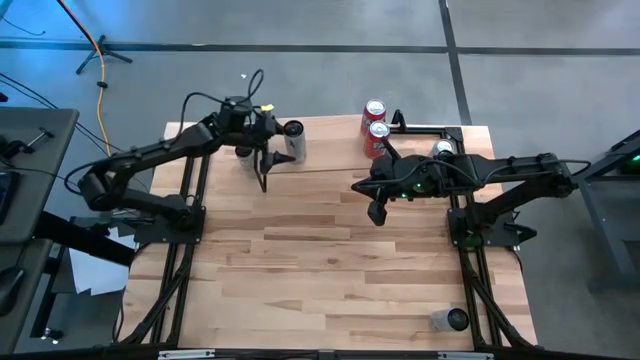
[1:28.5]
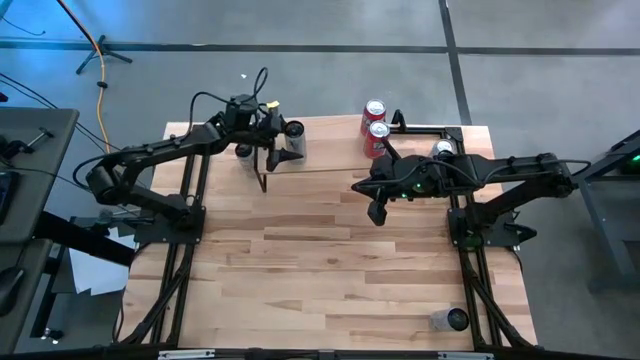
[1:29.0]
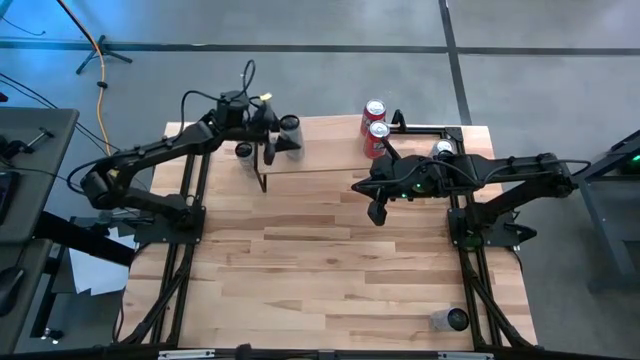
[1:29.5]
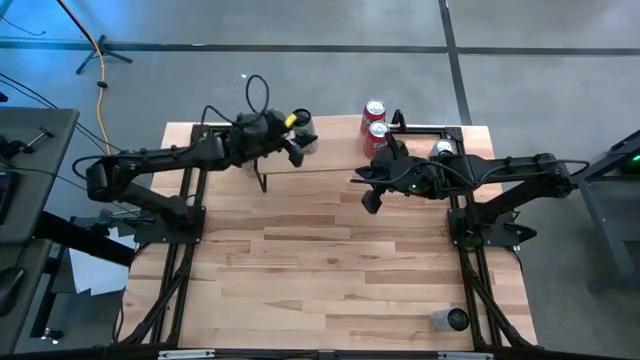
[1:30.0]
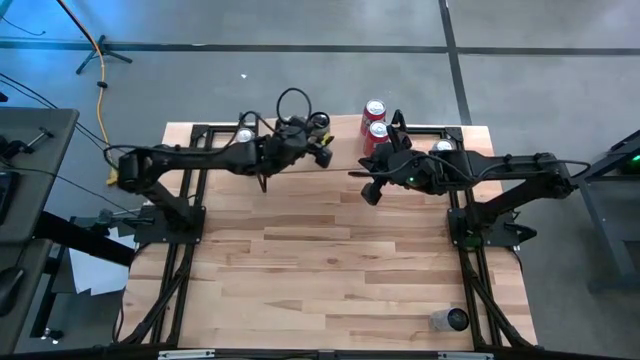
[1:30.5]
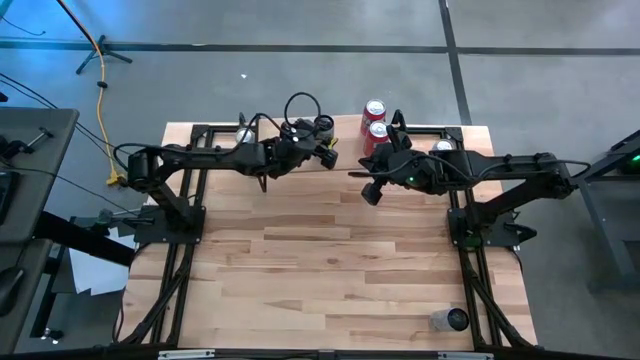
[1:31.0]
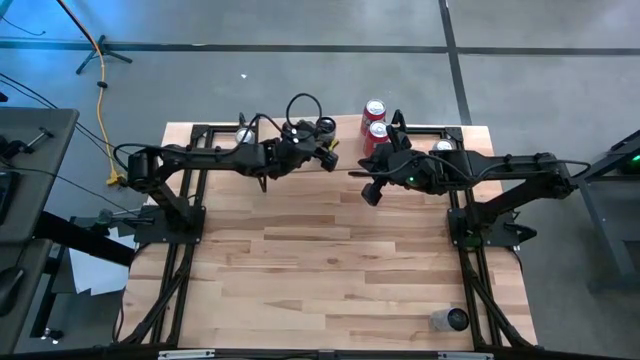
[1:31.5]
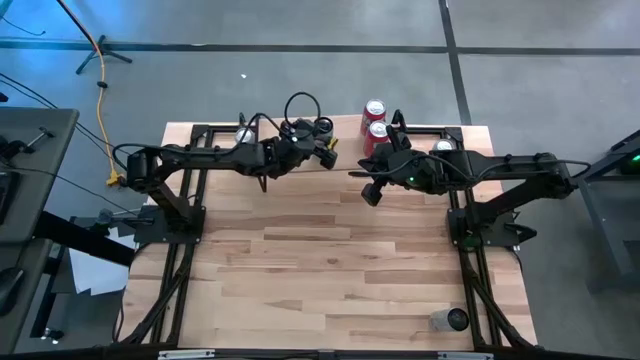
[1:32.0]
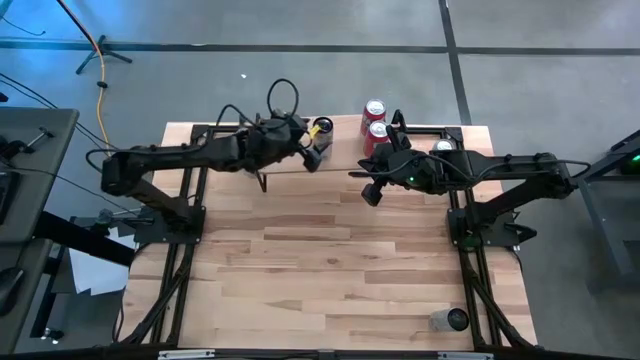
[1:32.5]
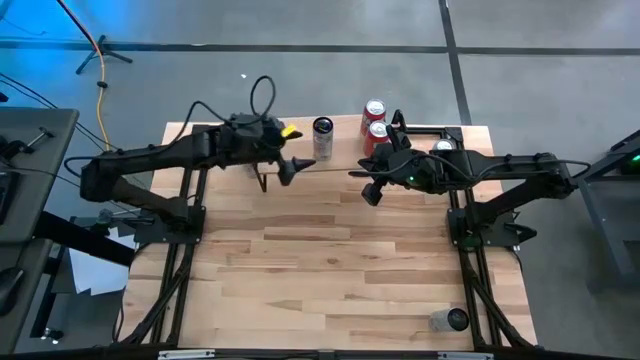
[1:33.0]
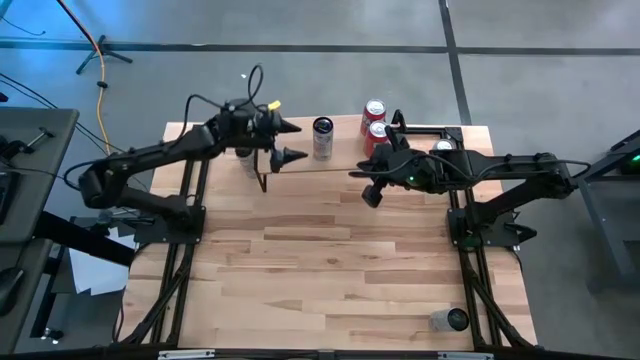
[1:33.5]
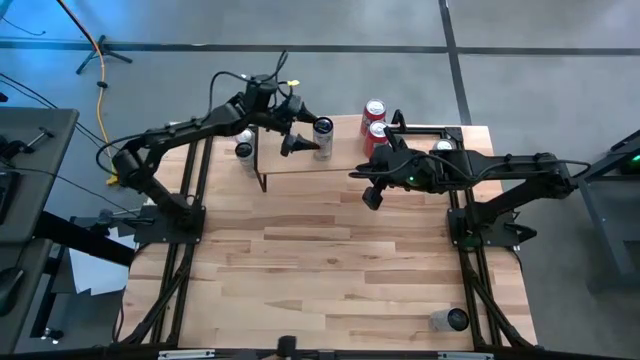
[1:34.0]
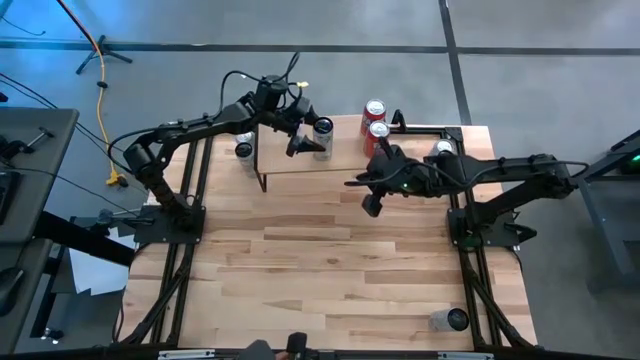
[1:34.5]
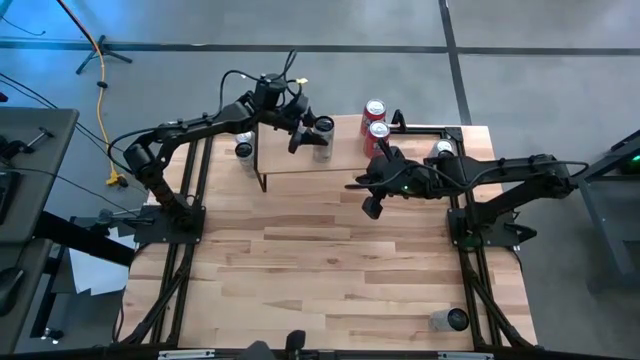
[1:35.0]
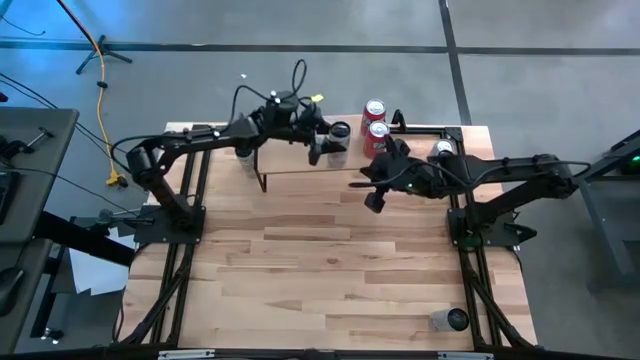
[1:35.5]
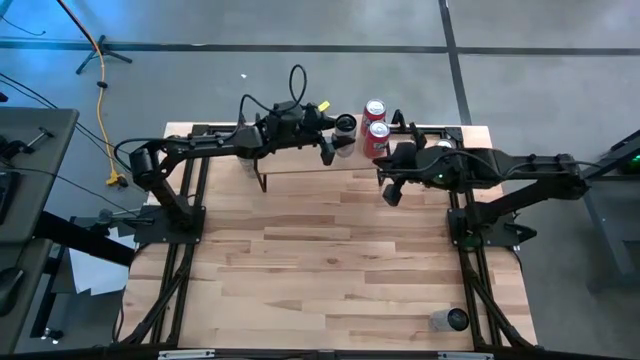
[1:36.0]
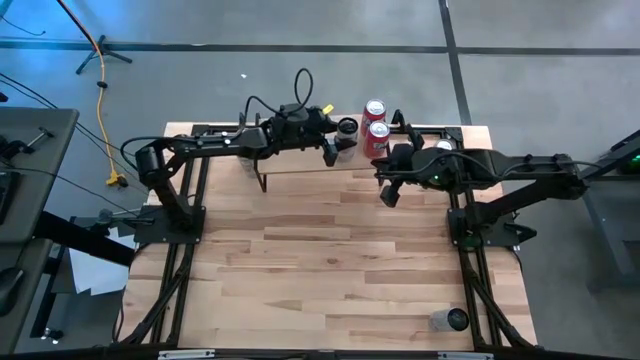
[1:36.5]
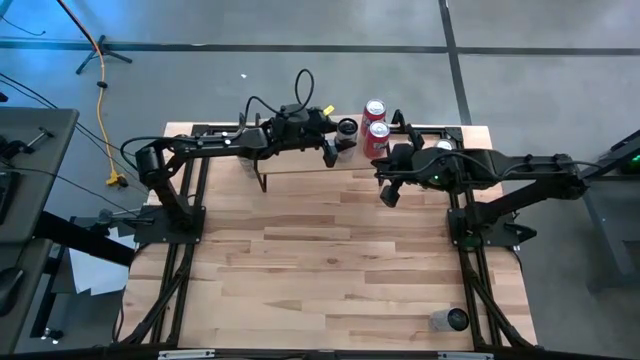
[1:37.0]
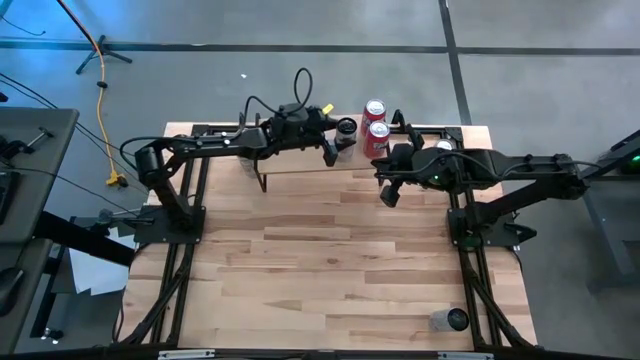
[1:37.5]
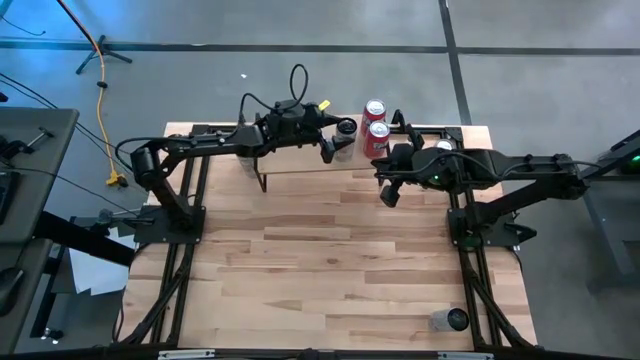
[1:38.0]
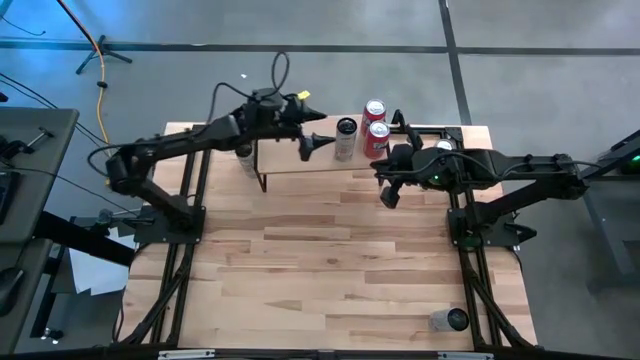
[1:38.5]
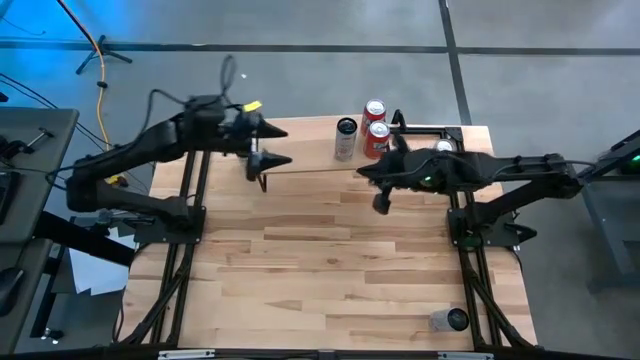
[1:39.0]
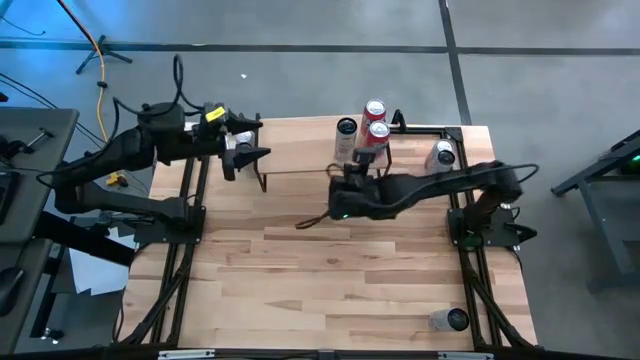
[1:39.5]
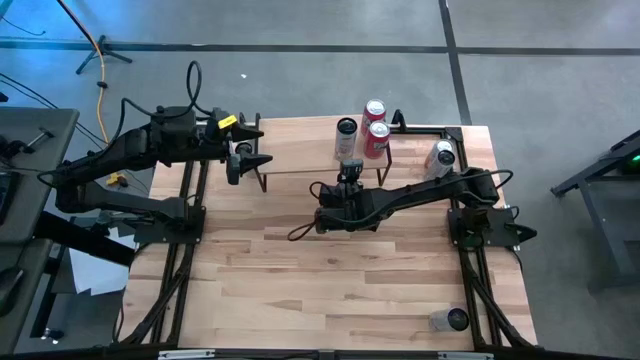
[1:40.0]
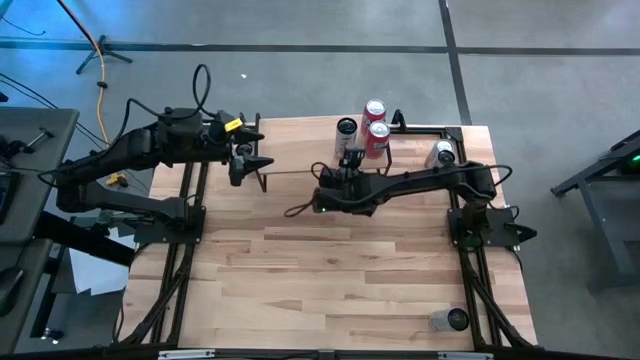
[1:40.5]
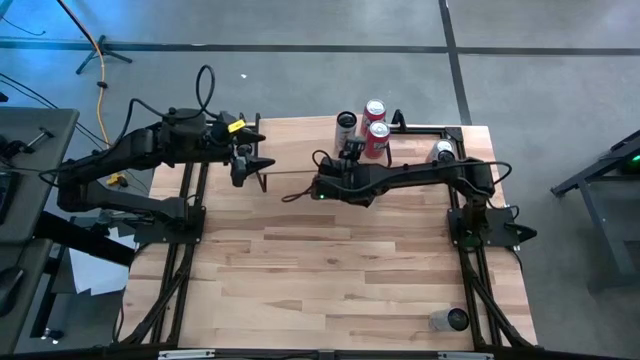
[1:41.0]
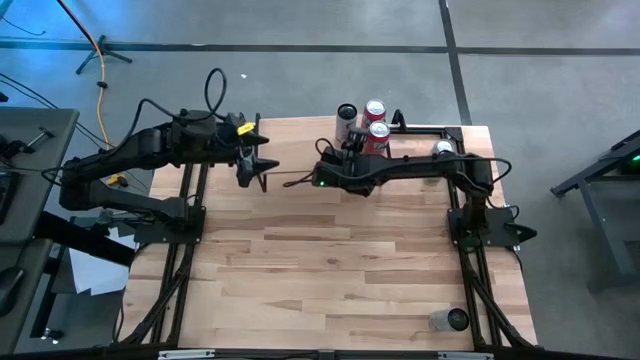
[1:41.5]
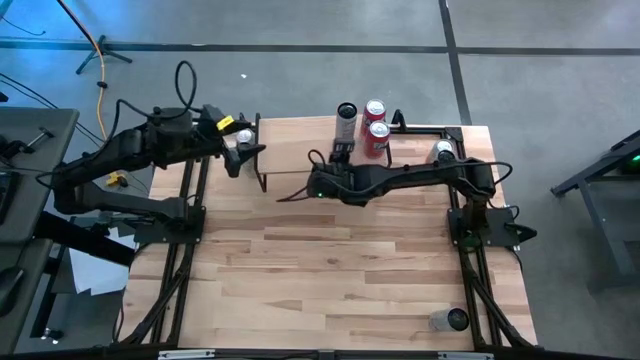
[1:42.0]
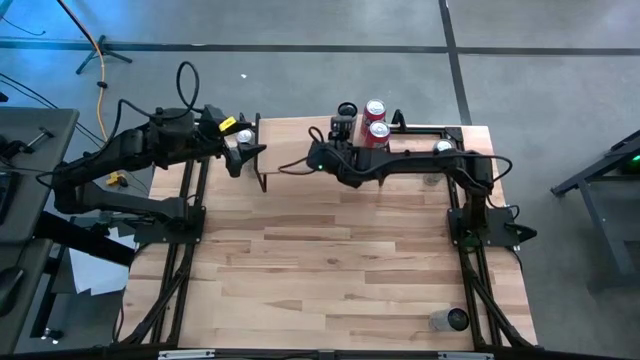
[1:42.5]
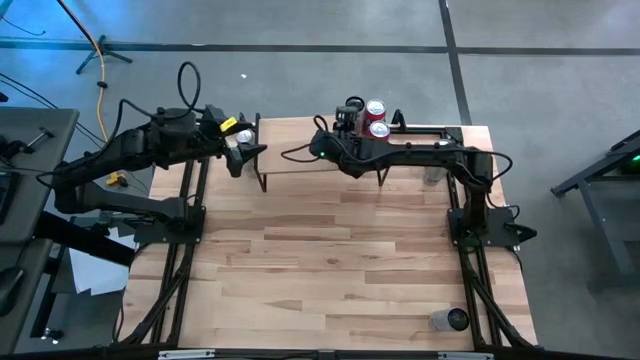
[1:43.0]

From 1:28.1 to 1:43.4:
Task: Place canned beverage on shelf
Put the bottom black orange soda can on the shelf

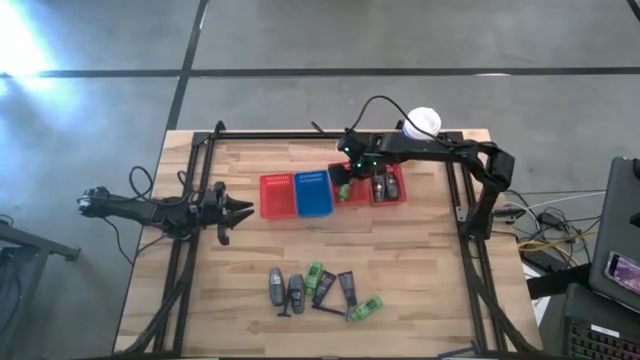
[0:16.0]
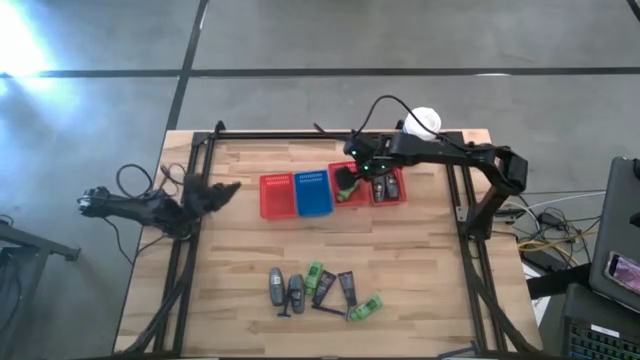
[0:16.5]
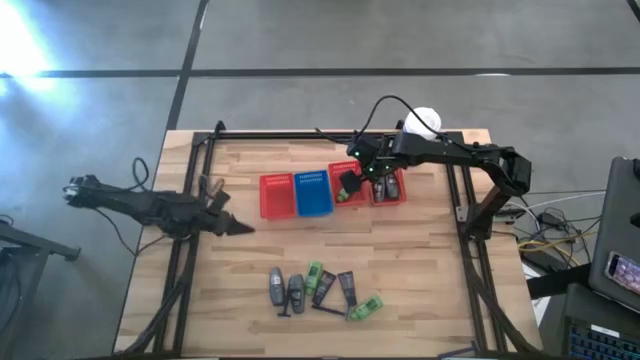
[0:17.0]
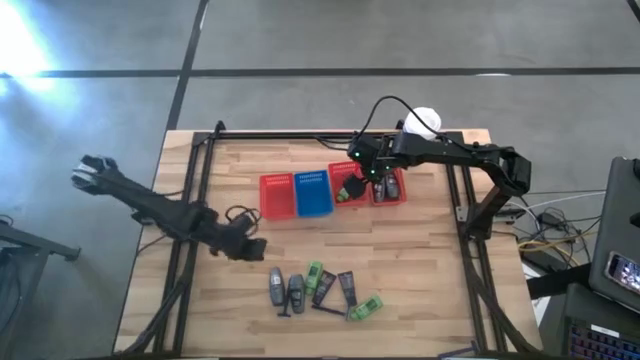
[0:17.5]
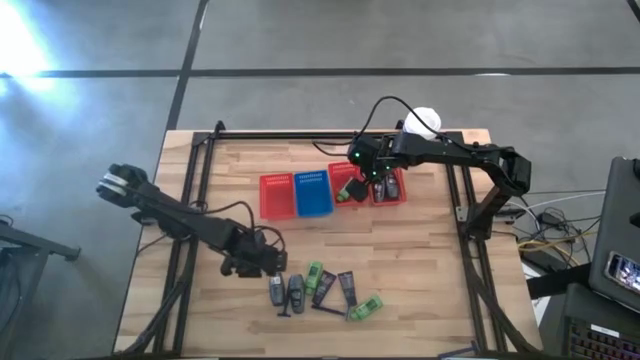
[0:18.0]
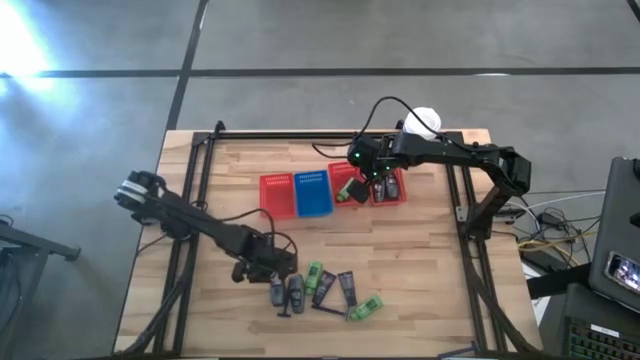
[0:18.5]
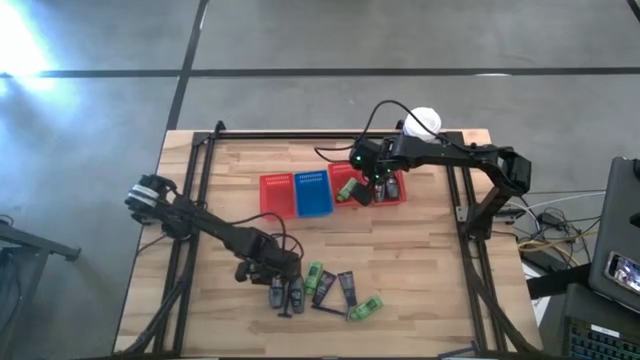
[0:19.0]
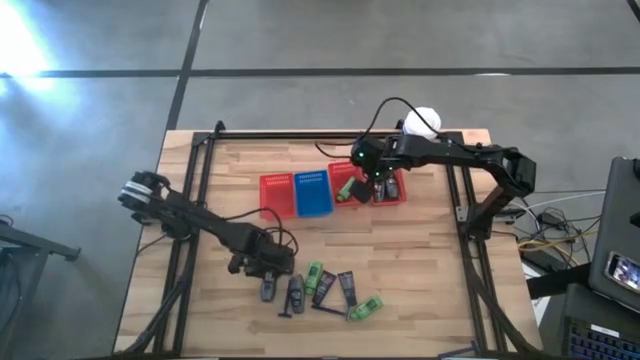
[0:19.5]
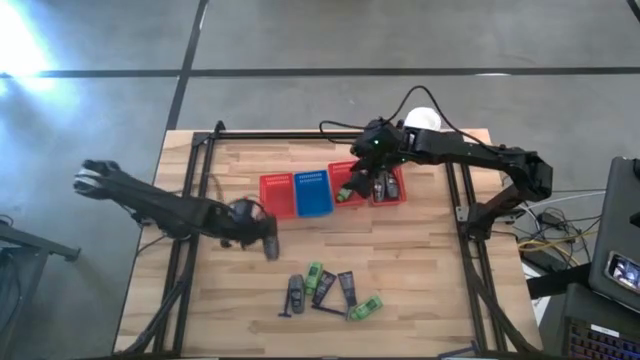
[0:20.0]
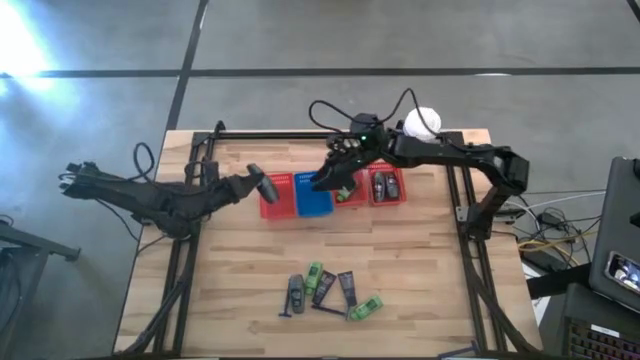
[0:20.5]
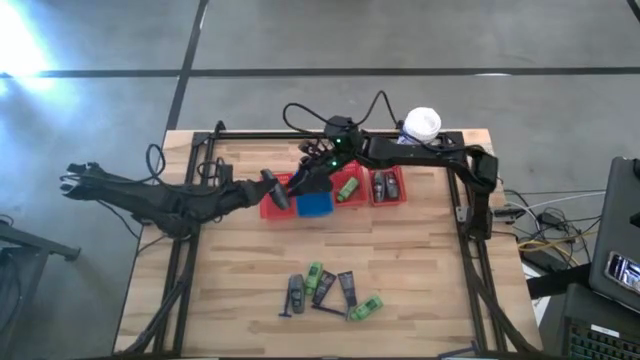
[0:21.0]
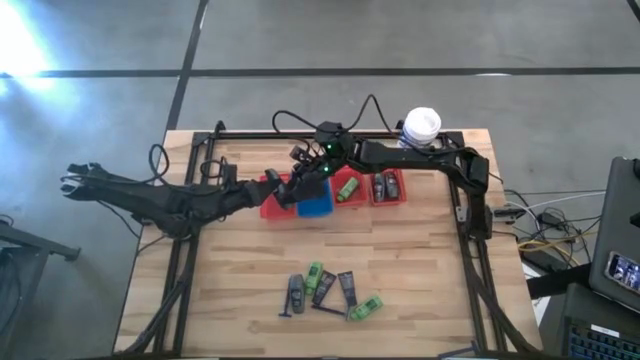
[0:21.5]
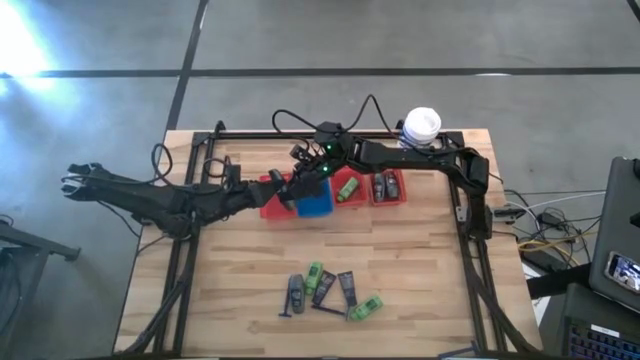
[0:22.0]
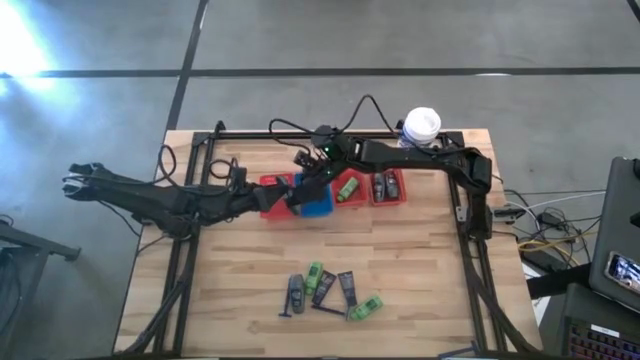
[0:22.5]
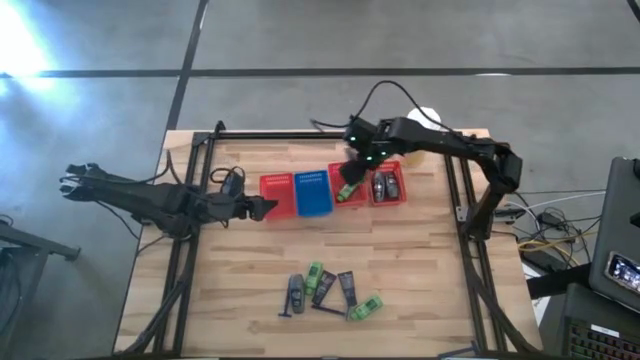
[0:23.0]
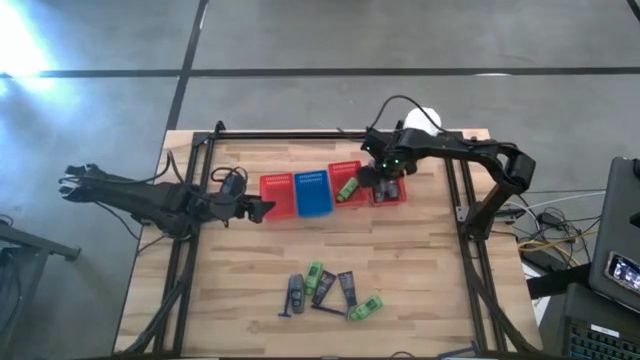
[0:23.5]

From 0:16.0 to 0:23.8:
Task: Pick & Place Travel size toiletries
Put the gray deodorant into the right red bin
